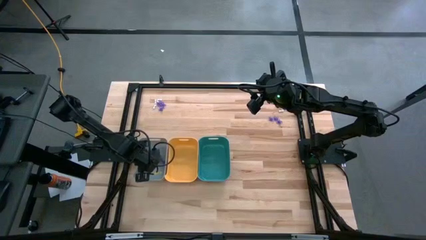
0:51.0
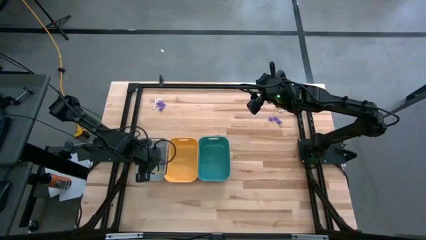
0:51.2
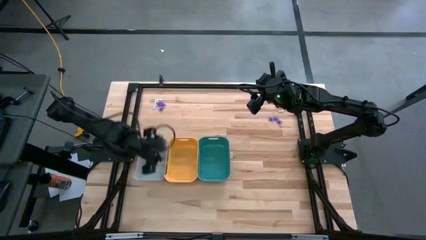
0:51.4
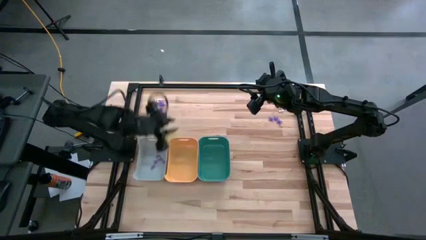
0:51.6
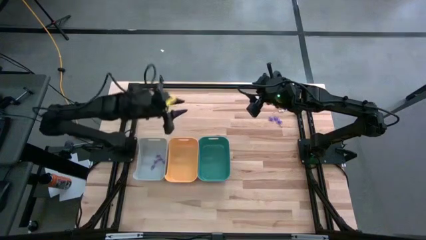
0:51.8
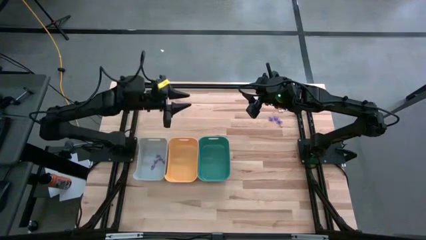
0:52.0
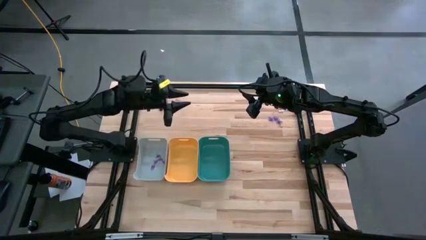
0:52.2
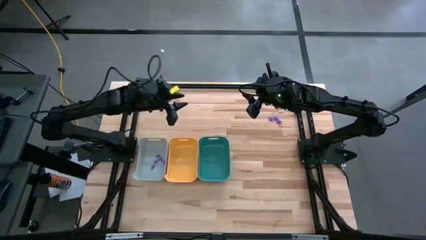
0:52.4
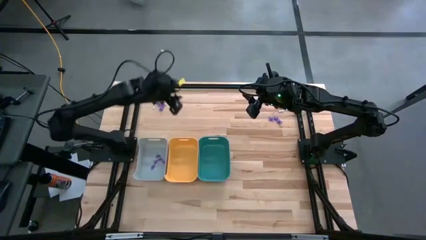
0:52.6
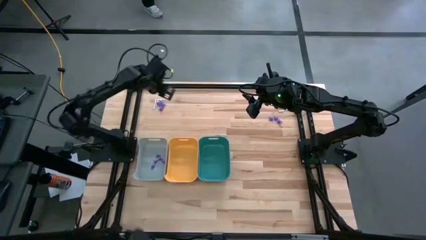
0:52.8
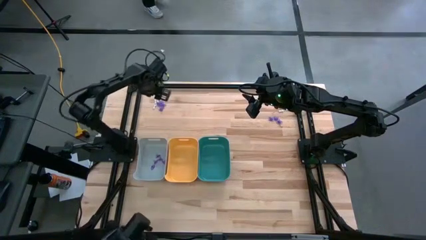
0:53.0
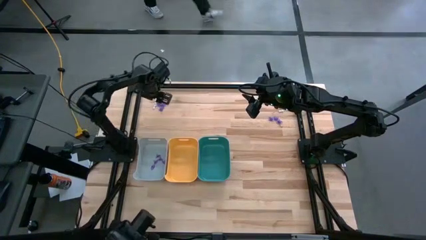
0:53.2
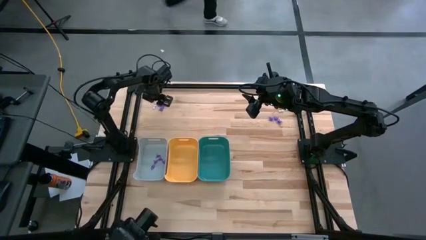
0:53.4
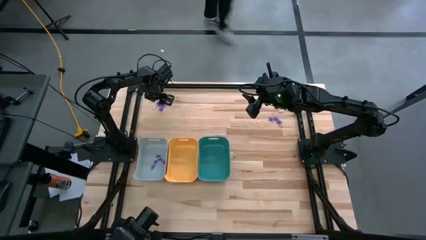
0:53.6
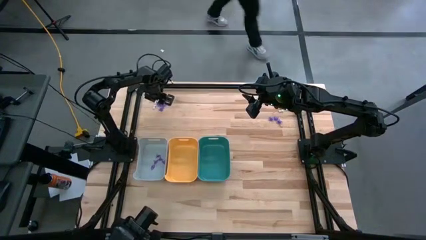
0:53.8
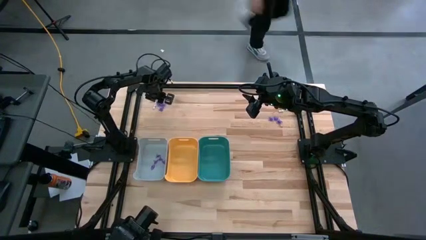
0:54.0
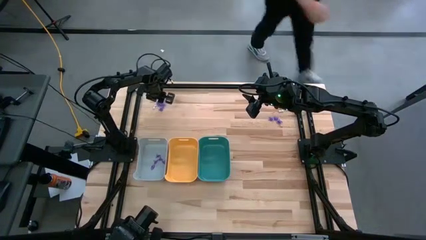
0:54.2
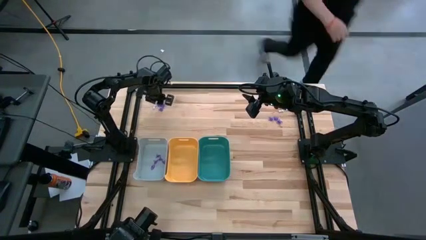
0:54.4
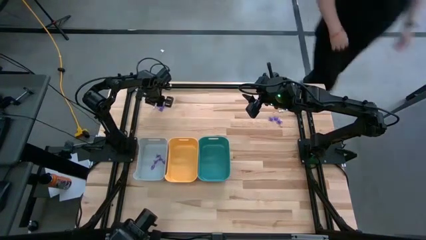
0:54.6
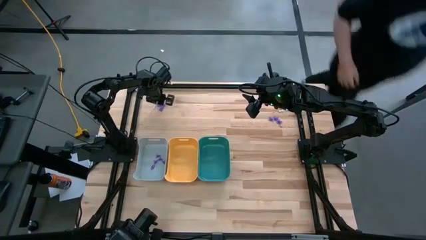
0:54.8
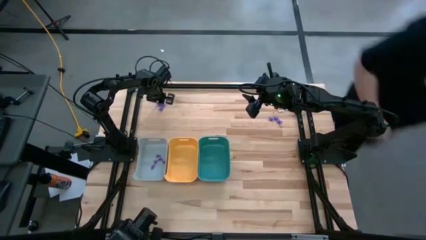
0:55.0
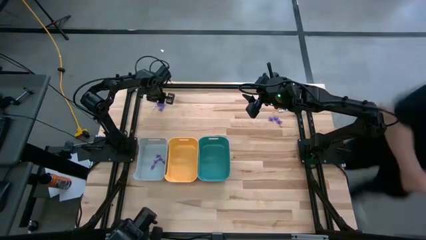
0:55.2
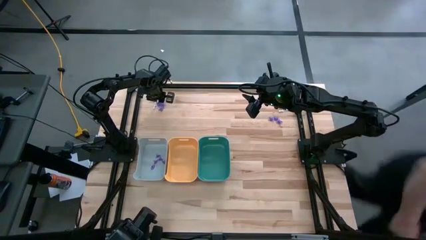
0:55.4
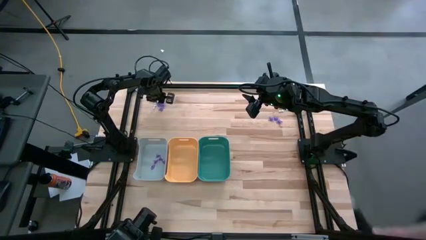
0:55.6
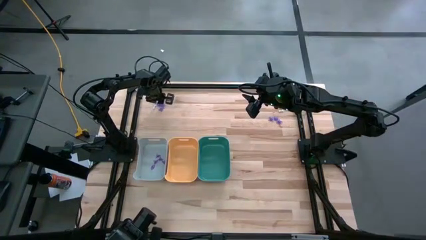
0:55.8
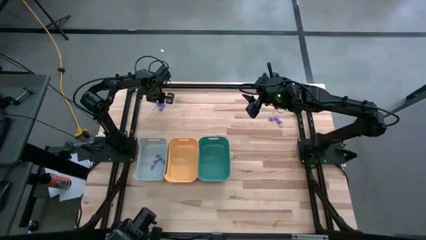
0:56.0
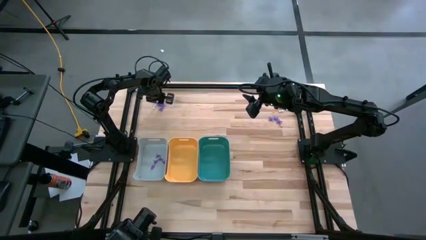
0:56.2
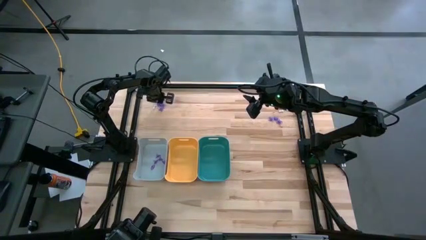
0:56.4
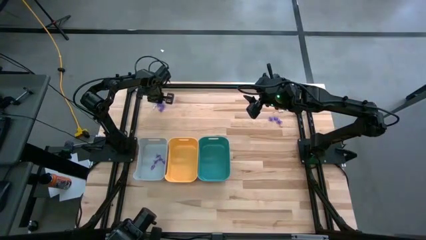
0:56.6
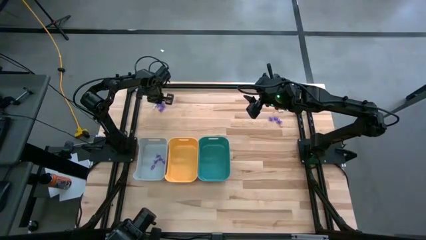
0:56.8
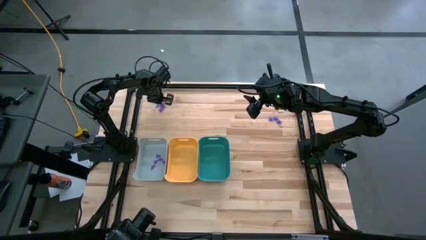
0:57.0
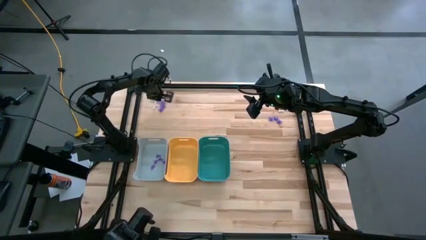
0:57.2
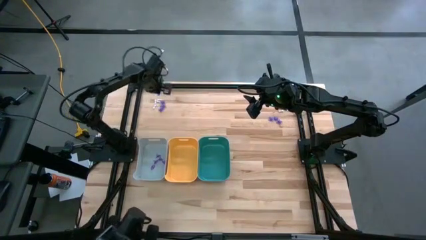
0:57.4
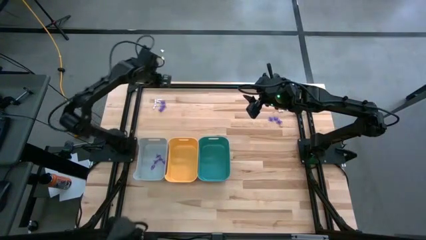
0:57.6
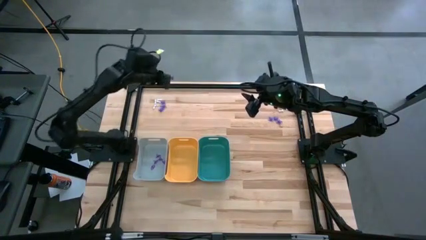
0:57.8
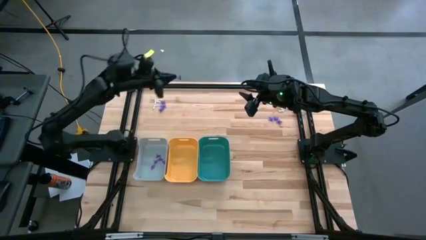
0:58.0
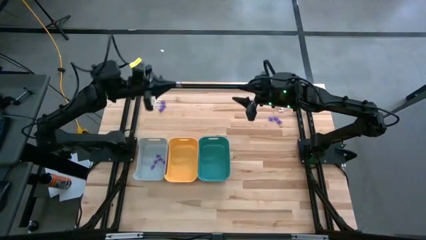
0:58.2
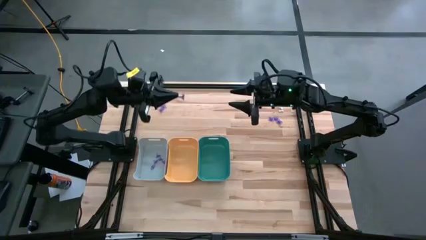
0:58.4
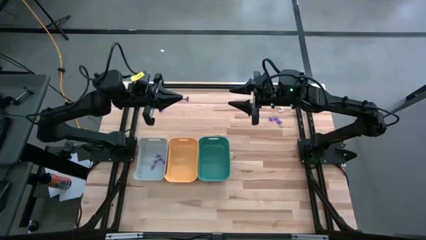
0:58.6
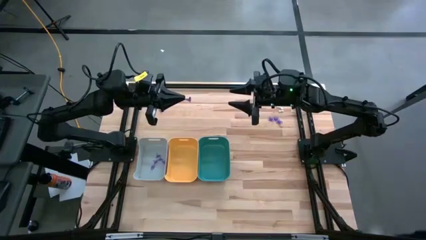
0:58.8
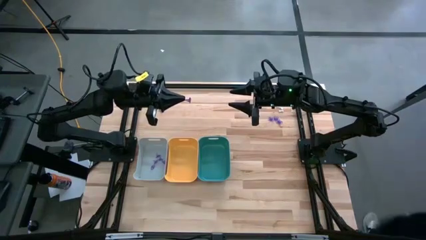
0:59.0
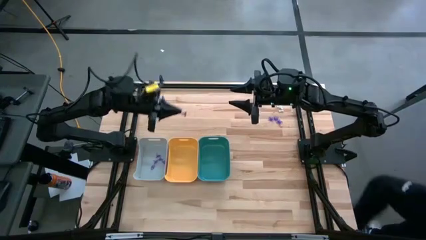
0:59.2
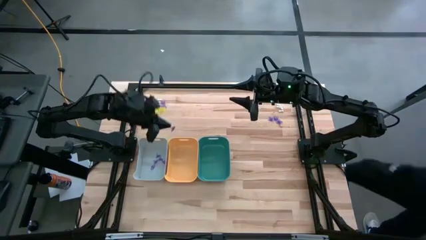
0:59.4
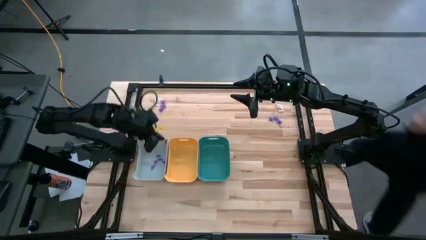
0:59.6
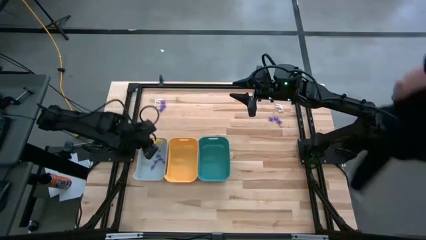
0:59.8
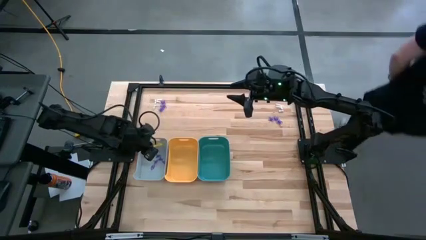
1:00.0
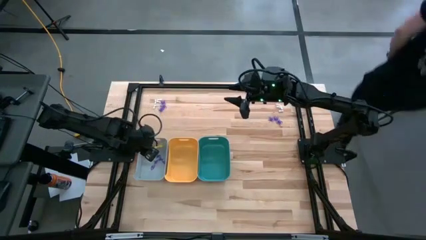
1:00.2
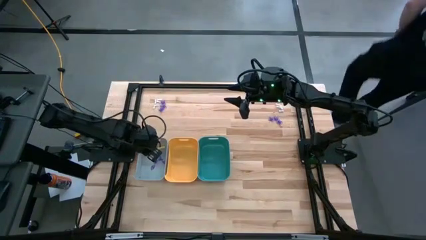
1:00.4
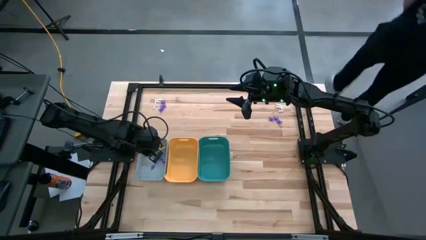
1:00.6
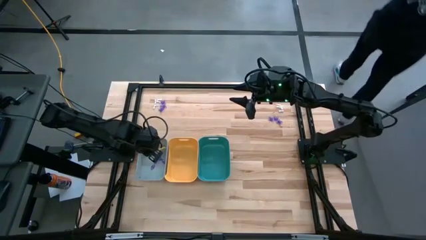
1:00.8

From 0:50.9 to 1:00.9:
Task: Sort Halloween decoration
Put the purple witch hat toy into the white bin

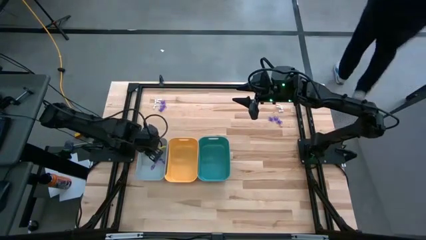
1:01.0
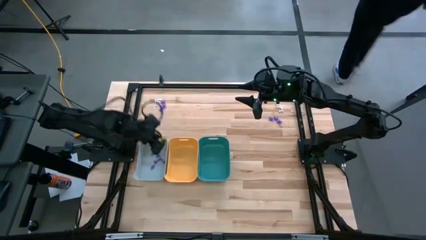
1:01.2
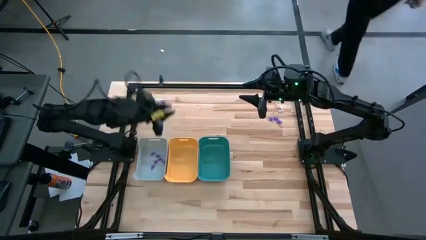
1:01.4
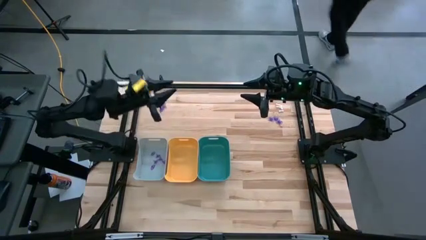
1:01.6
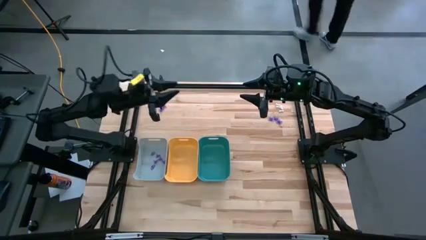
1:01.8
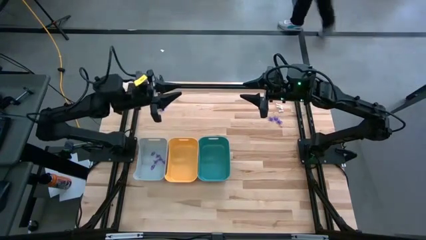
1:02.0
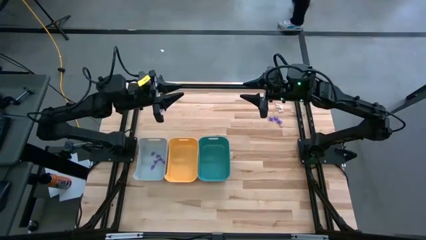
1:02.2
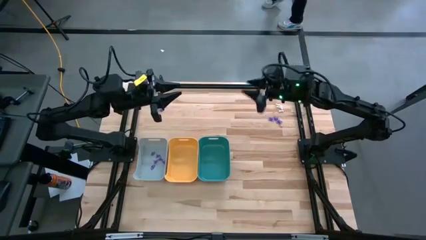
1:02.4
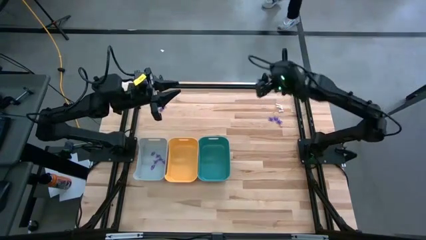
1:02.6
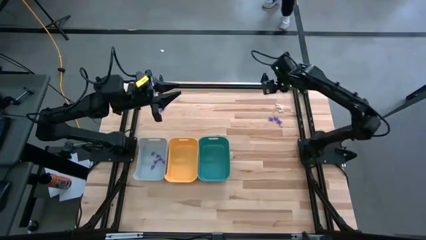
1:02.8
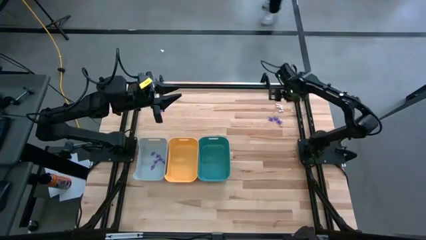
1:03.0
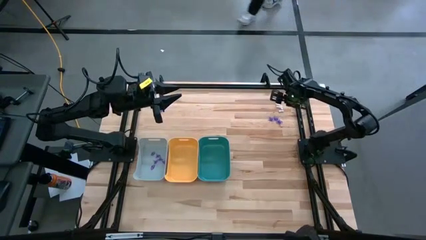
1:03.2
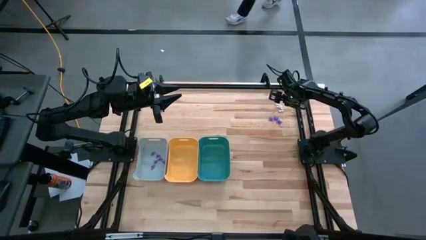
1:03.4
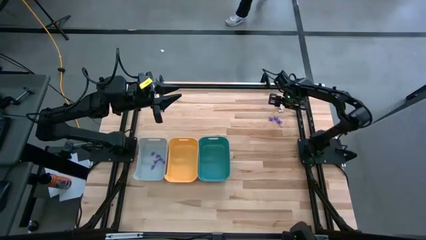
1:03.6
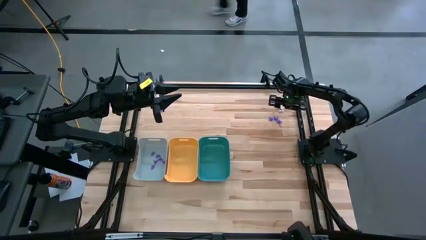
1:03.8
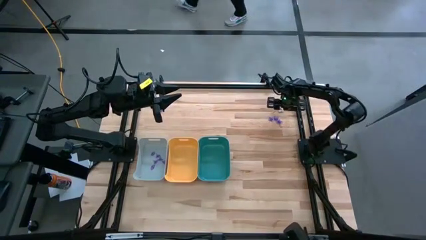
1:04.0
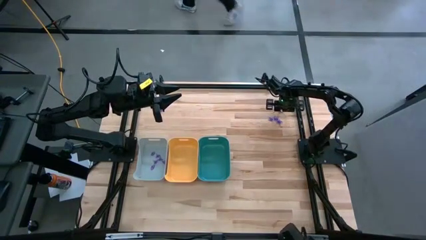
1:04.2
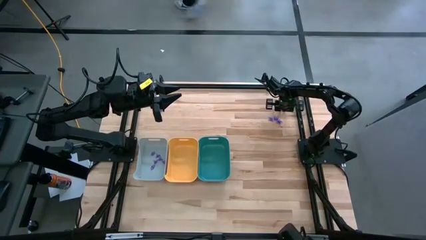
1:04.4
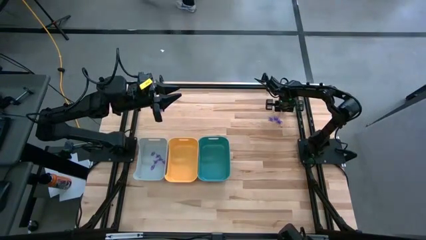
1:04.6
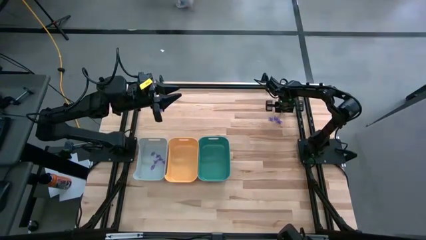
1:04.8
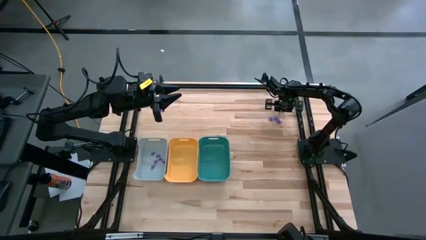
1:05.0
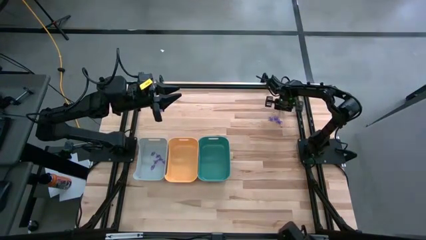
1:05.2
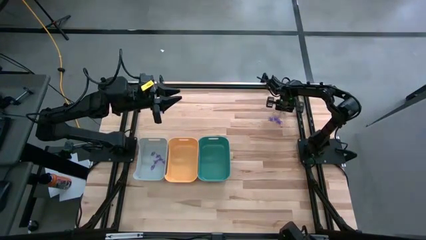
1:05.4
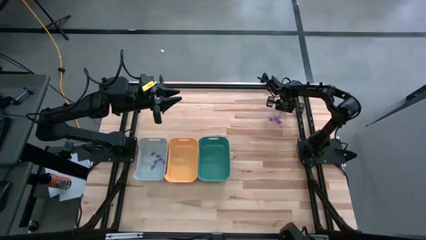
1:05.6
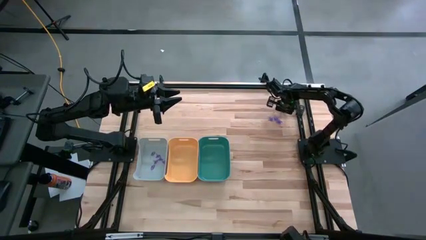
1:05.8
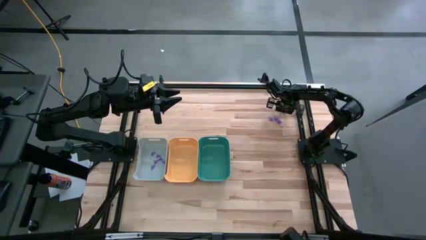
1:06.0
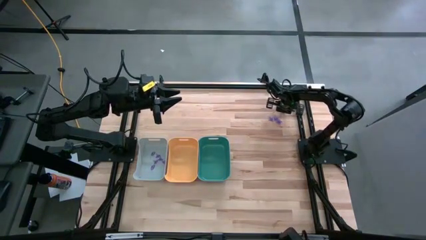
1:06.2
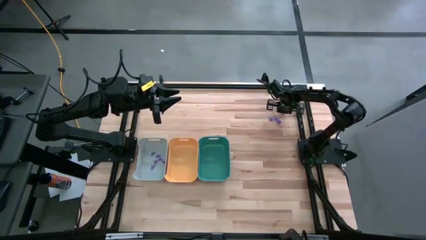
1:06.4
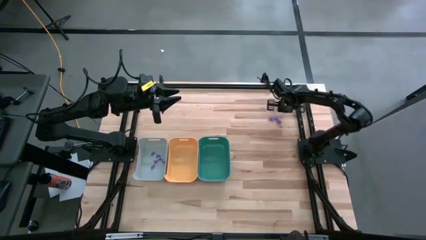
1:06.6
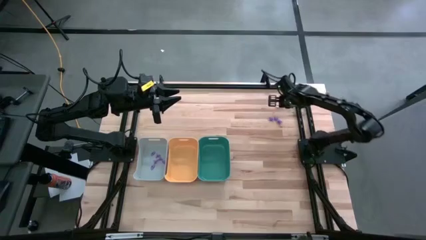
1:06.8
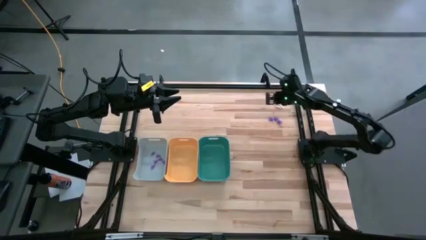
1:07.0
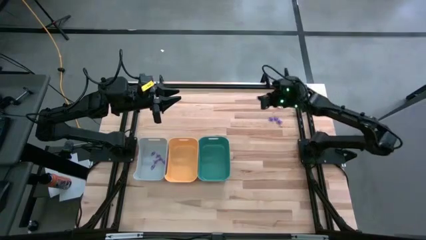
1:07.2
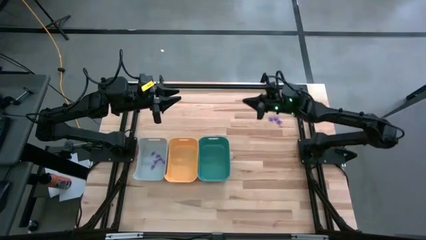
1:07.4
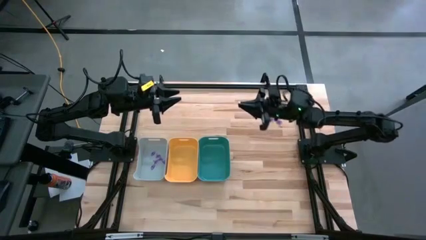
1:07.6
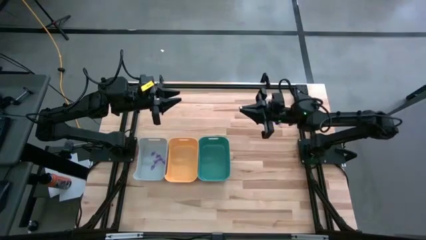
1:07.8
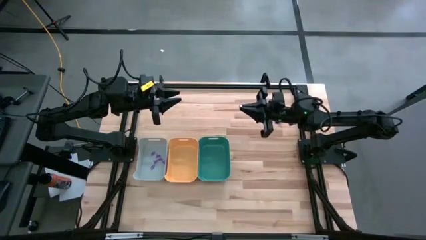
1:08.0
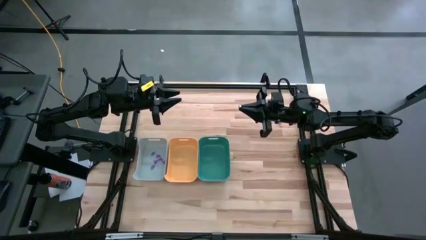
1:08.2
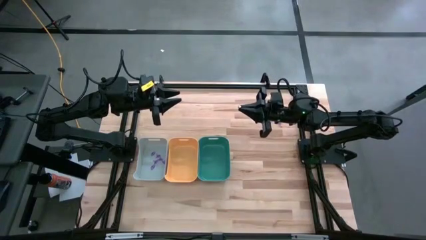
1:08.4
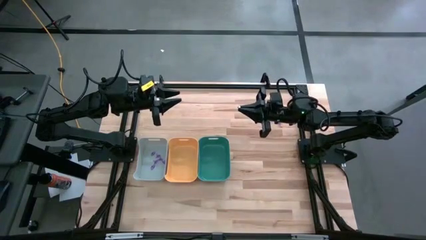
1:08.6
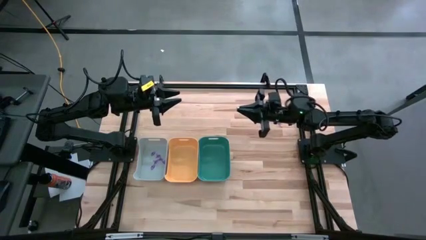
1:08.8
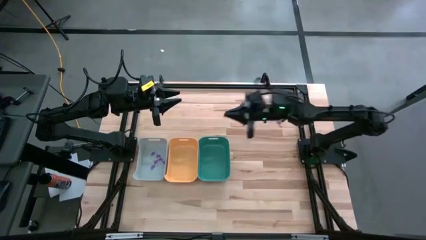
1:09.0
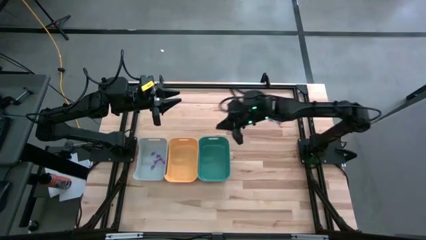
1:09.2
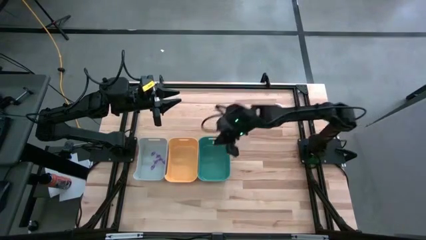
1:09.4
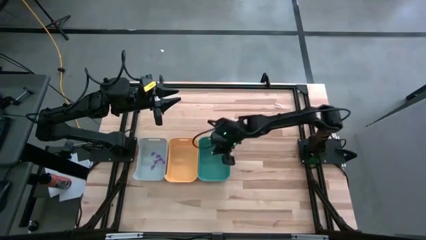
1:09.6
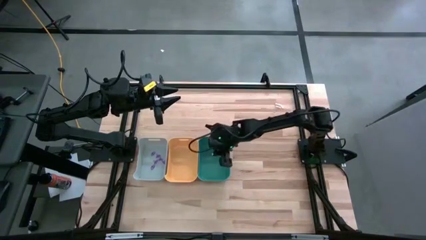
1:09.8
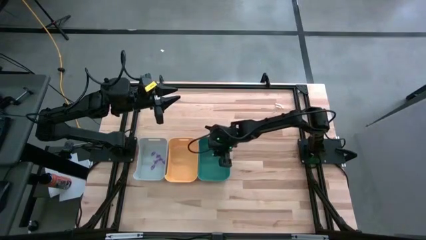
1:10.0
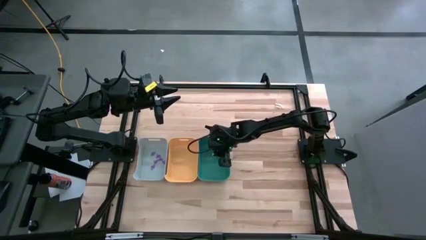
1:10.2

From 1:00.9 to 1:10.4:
Put the white bone toy into the green bin
